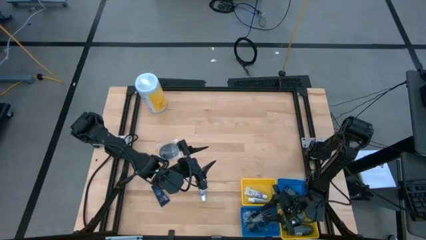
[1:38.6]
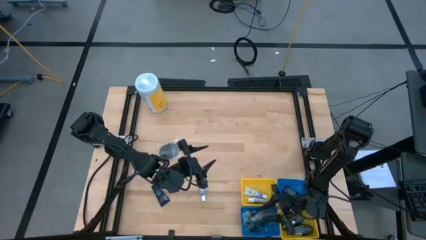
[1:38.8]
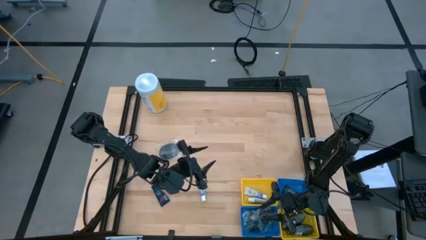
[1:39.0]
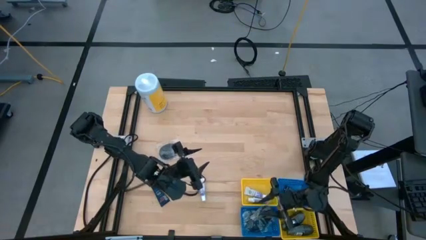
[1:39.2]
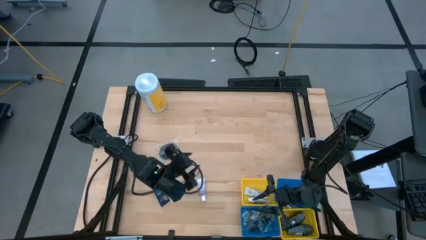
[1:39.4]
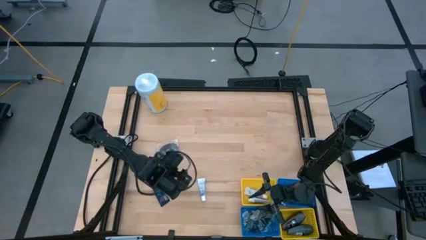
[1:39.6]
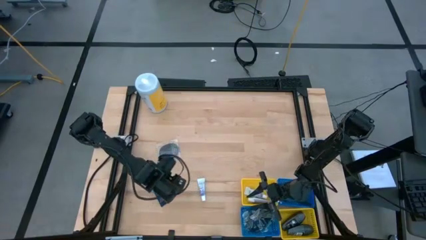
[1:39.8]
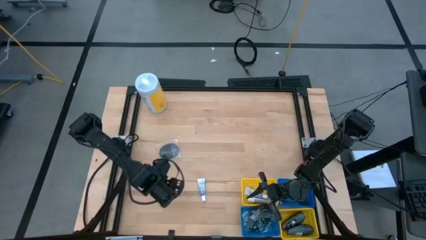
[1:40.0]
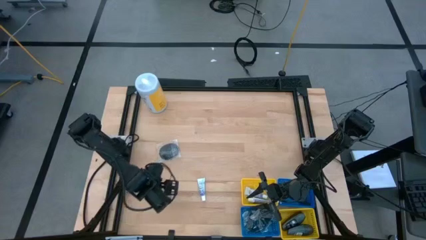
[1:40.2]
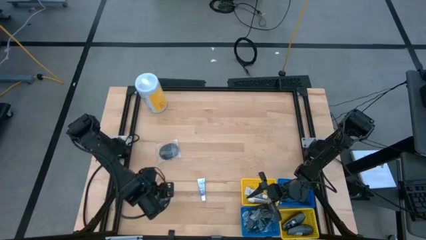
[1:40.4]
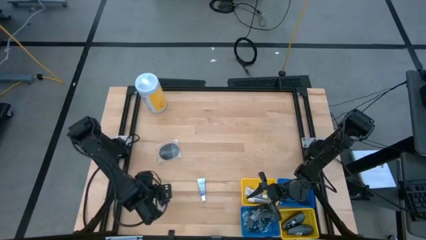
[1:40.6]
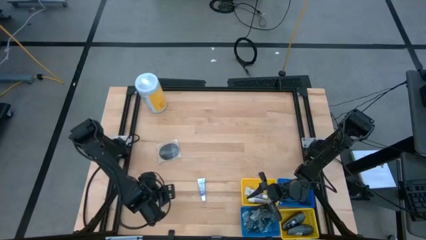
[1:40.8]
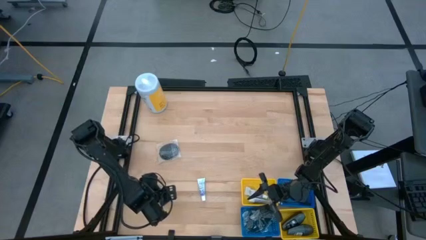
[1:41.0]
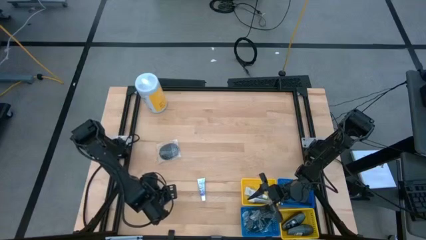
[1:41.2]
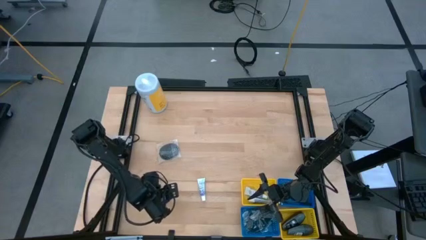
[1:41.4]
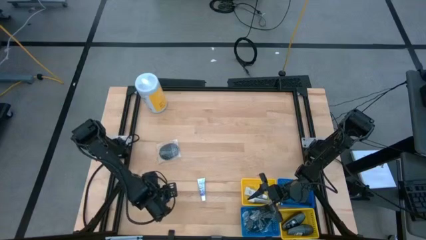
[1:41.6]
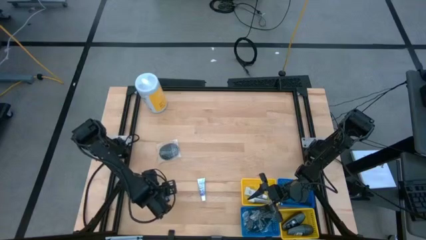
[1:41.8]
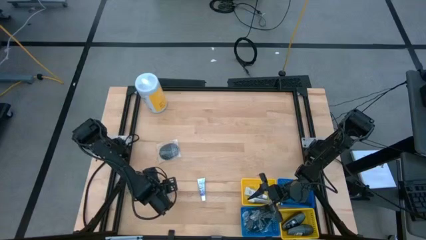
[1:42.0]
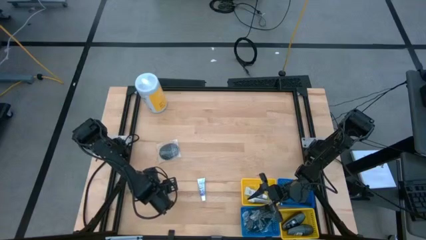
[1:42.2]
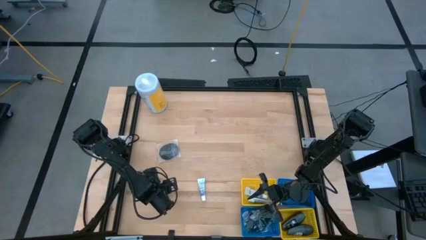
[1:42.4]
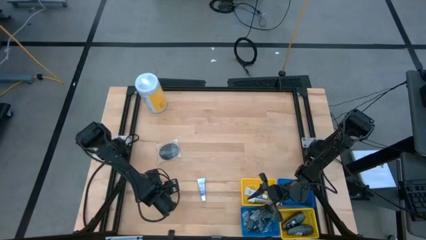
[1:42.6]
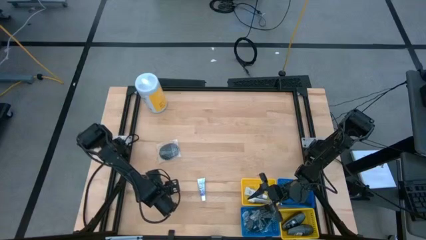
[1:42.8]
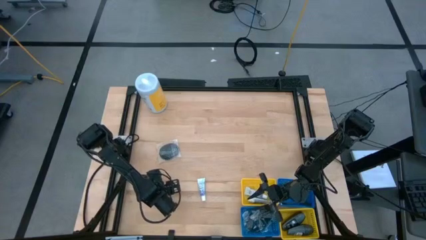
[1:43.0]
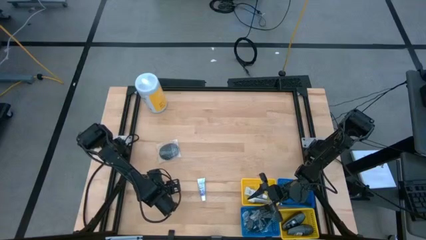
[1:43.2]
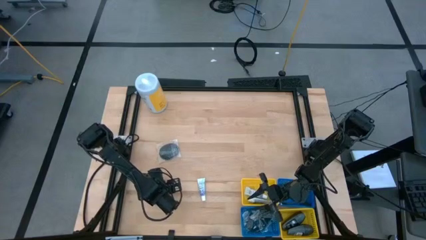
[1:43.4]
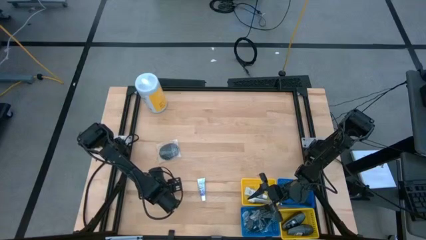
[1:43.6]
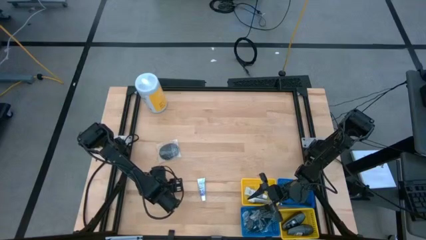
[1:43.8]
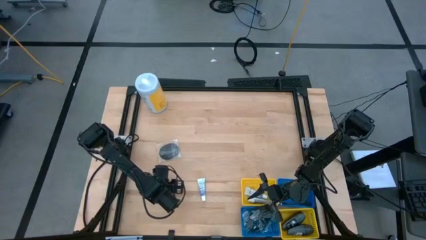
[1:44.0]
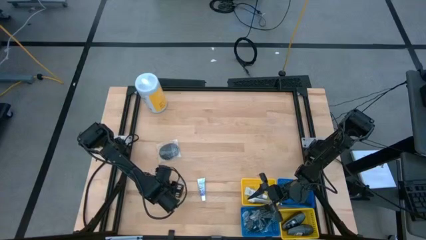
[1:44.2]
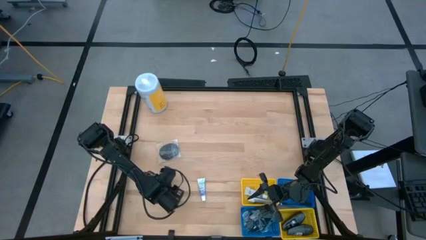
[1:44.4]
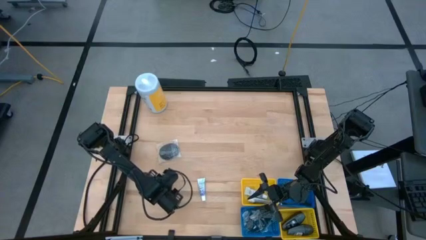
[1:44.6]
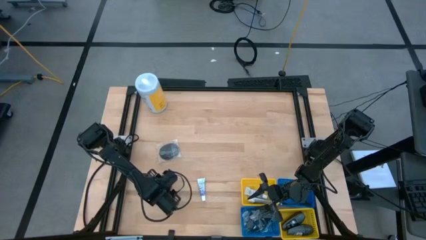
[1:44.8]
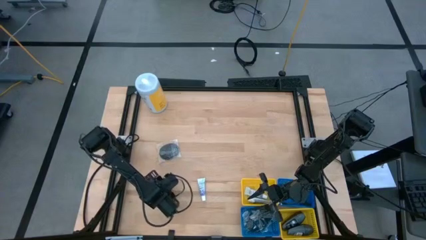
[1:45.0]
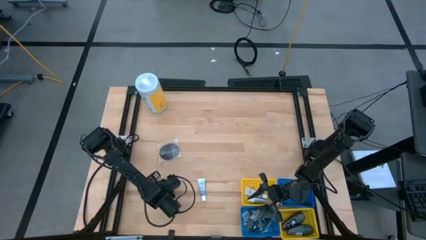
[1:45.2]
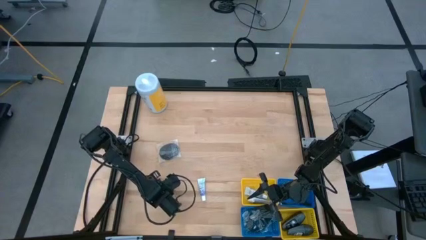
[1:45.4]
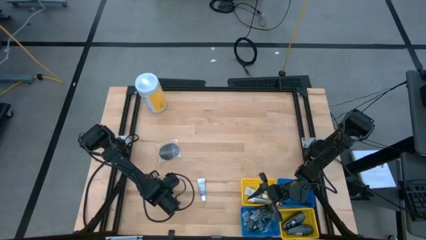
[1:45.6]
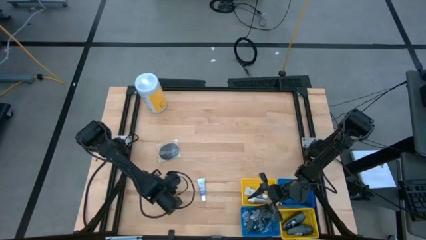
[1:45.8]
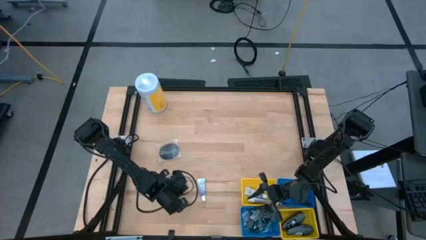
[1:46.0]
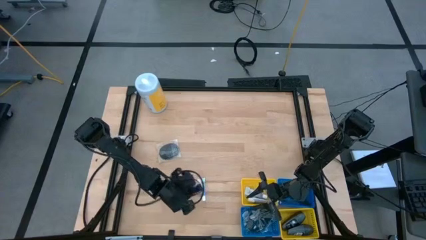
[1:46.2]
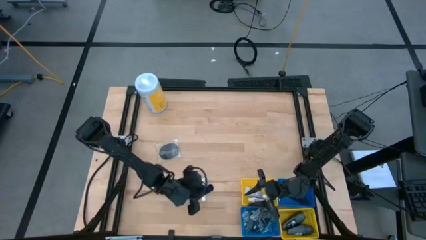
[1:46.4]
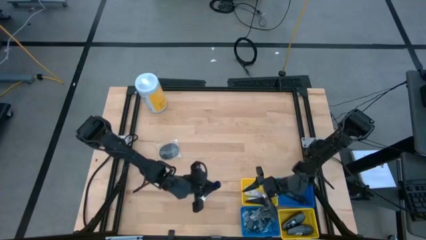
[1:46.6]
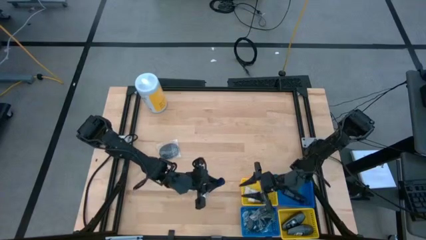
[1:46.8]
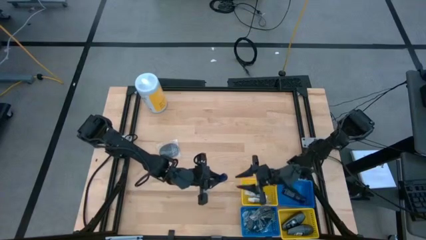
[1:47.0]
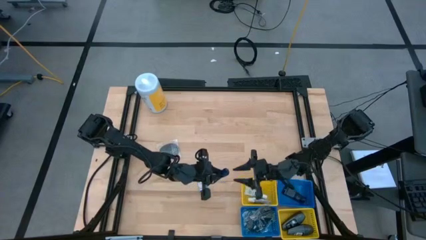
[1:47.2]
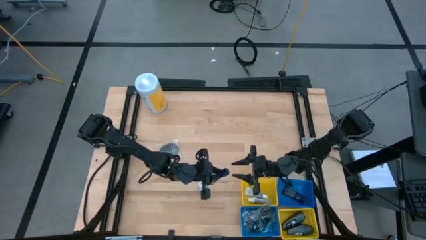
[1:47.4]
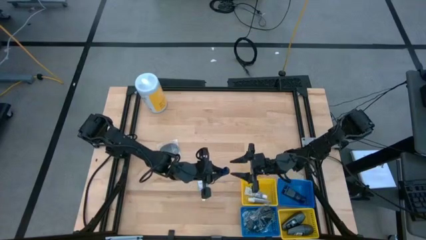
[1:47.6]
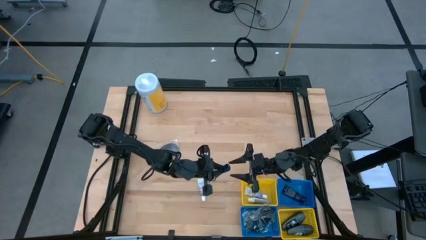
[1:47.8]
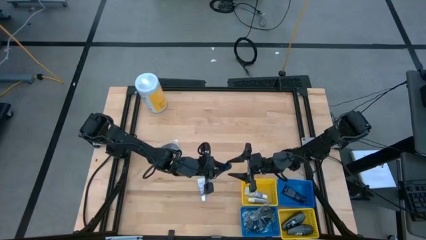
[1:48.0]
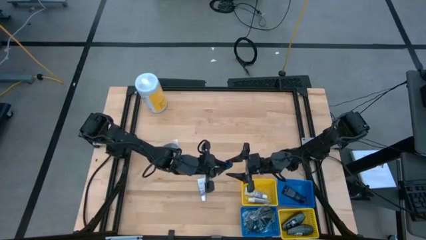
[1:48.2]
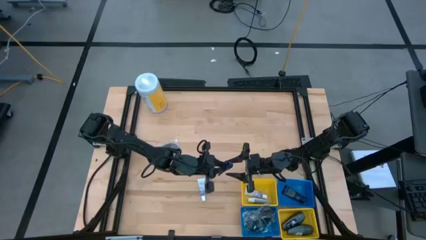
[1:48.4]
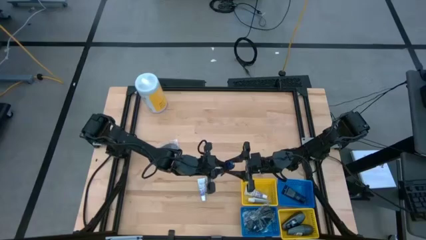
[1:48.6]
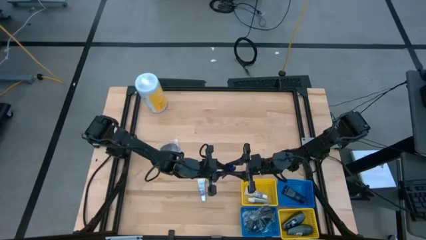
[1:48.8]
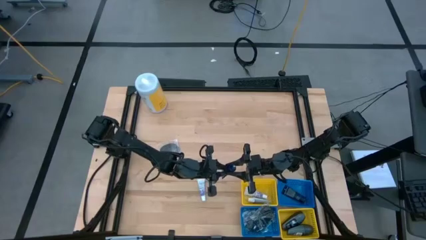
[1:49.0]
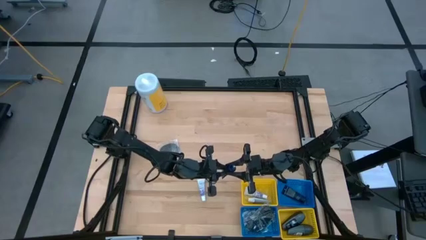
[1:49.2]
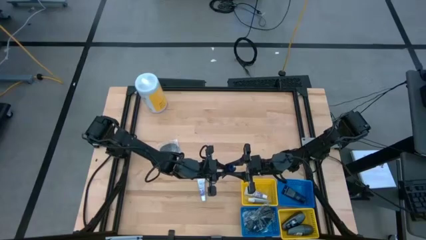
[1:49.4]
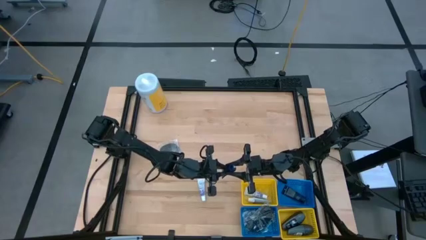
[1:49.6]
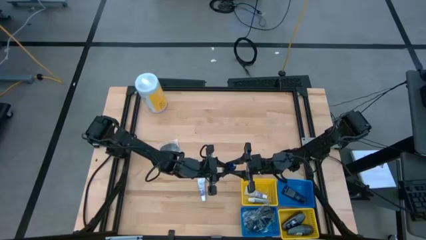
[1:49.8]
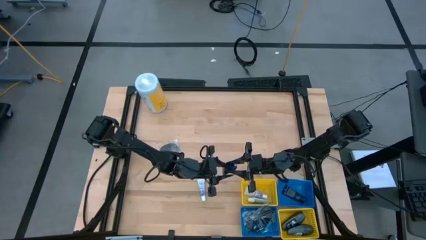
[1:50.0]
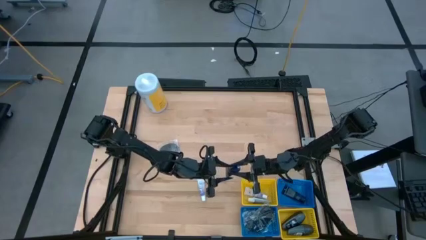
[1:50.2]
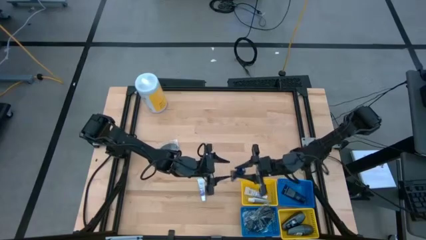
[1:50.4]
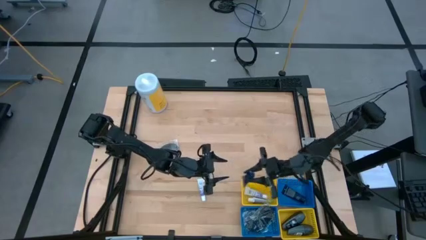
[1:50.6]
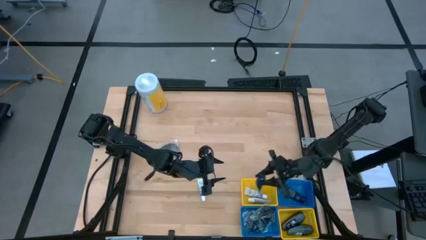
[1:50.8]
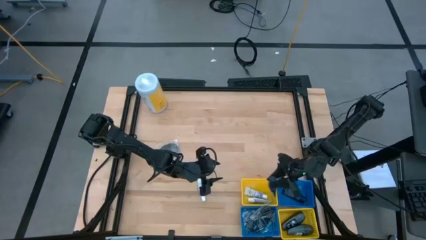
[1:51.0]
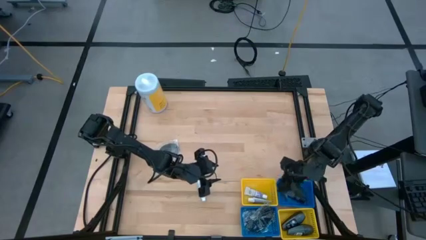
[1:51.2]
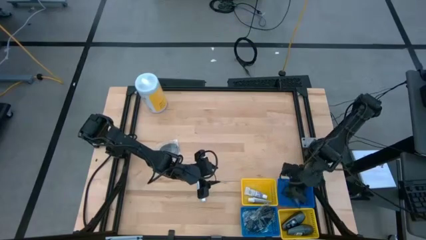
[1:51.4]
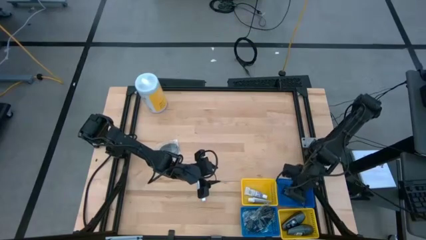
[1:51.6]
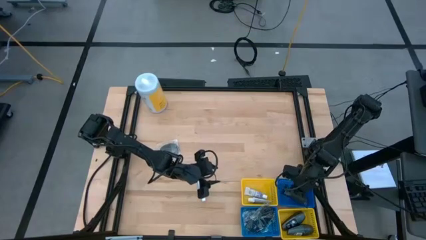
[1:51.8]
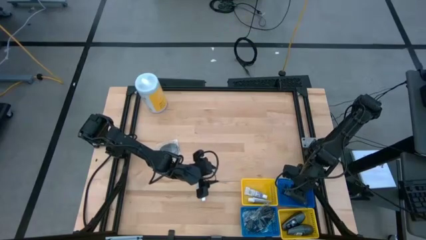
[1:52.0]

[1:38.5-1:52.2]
Task: Pick & Place Travel size toiletries
Put the black shave cream into the top blue bin

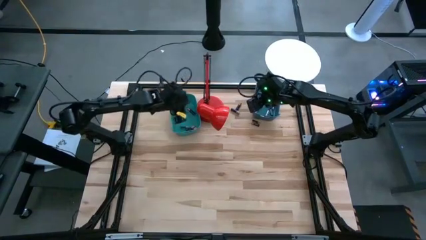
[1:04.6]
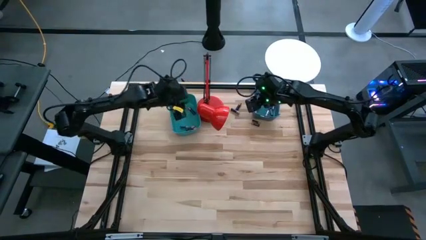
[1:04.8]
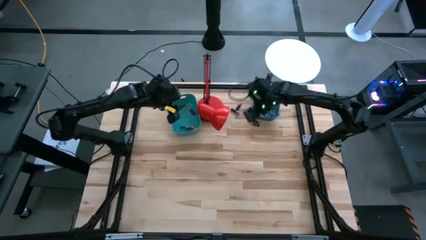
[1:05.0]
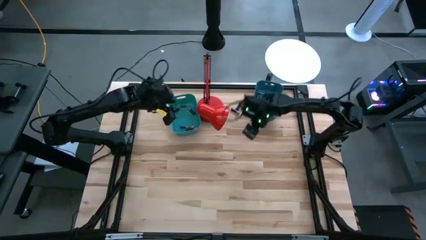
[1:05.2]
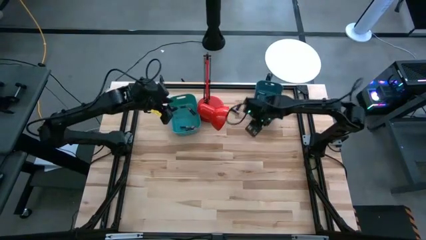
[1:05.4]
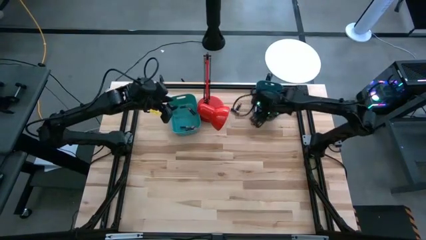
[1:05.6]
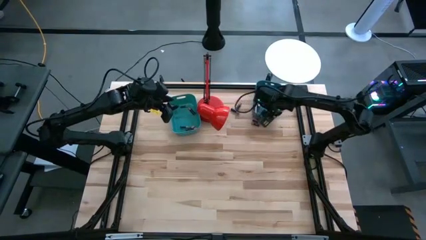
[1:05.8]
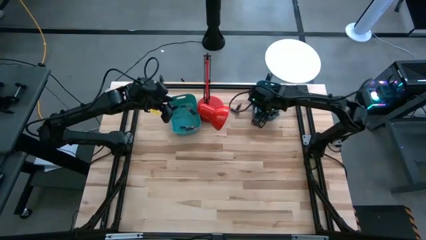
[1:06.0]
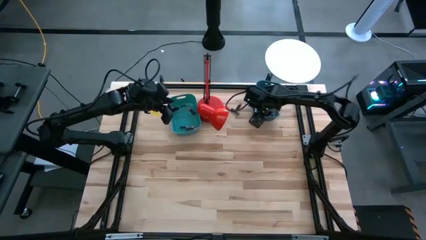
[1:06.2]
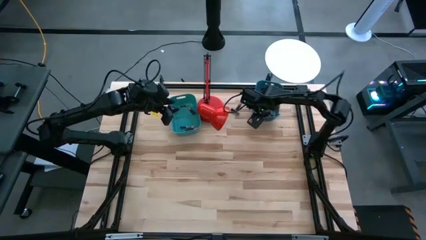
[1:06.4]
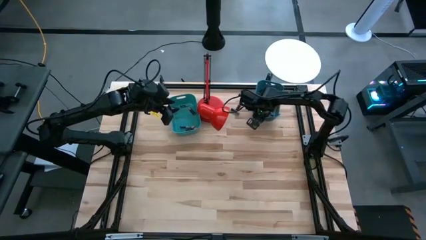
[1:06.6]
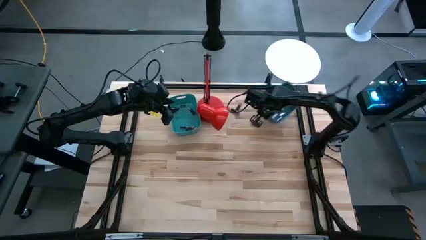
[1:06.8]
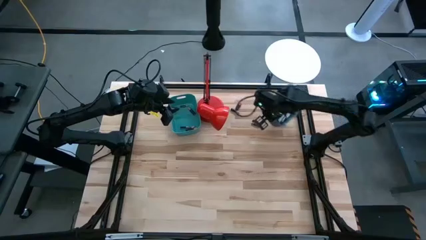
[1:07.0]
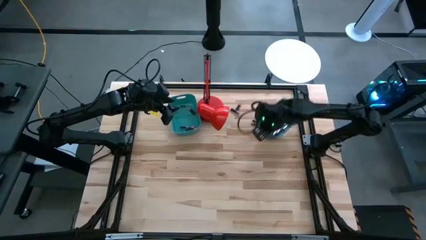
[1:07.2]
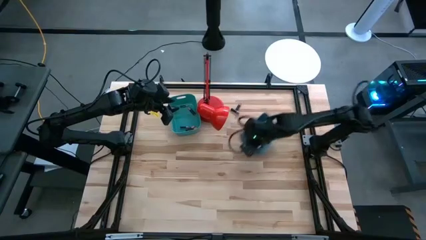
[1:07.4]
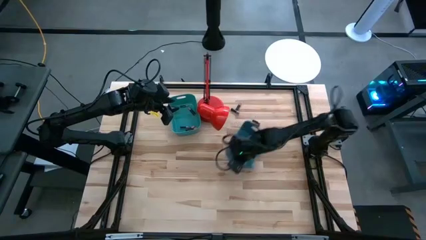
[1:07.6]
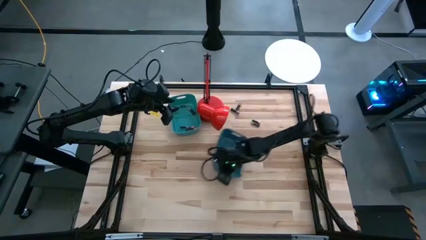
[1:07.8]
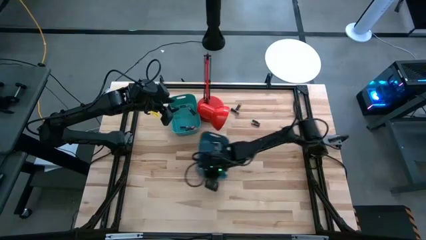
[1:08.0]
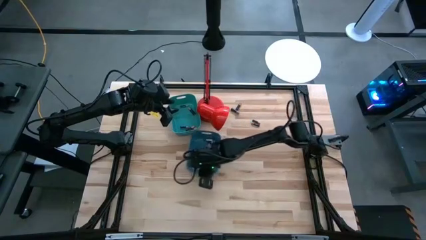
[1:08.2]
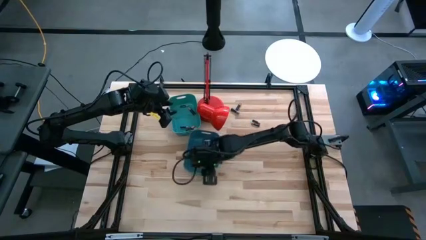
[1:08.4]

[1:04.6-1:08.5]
Task: Sort batteries
Move the blue bin to the bottom of the green bin
